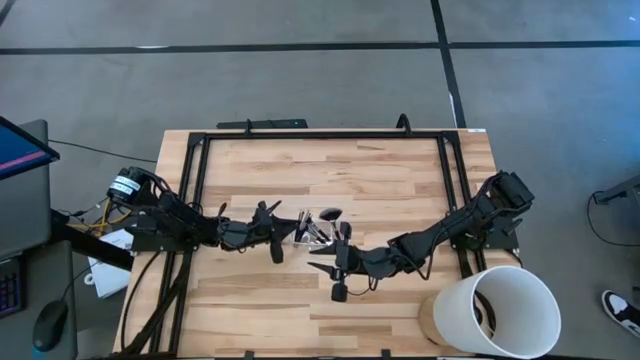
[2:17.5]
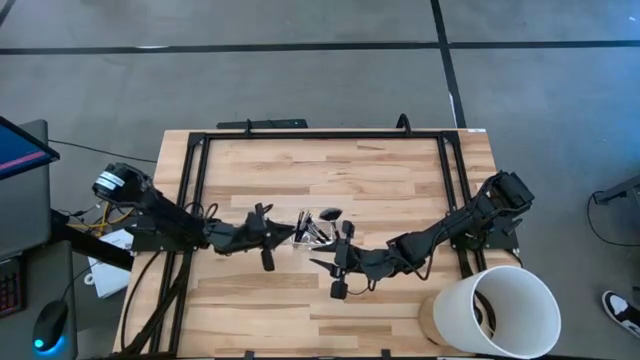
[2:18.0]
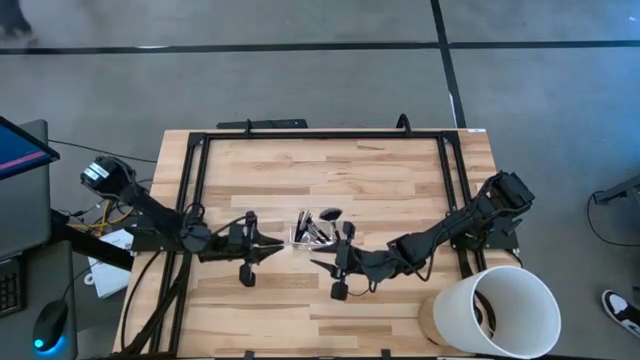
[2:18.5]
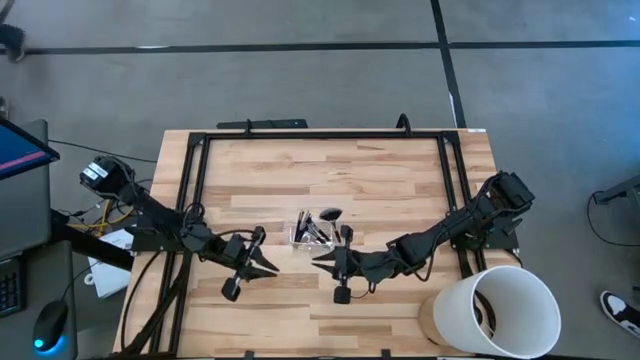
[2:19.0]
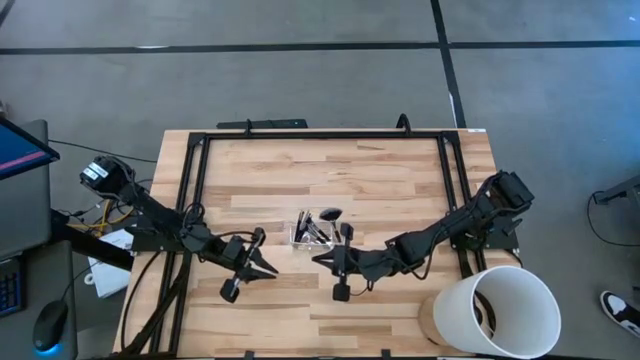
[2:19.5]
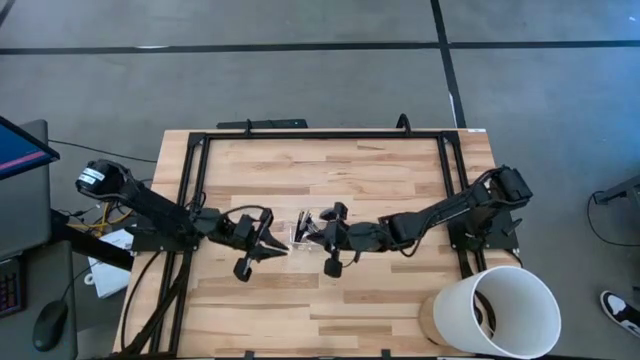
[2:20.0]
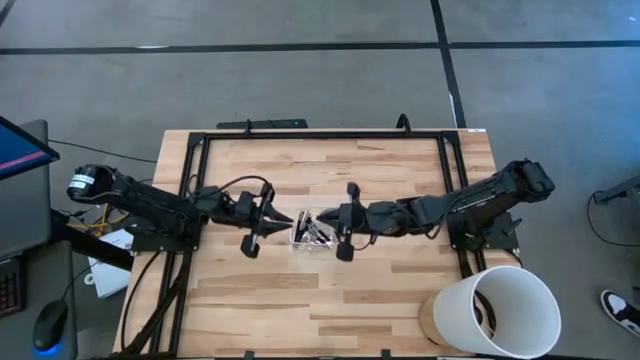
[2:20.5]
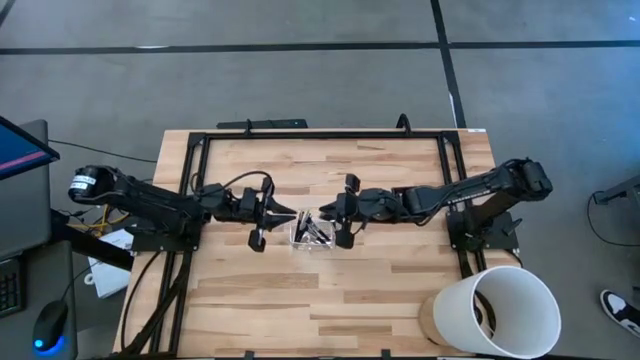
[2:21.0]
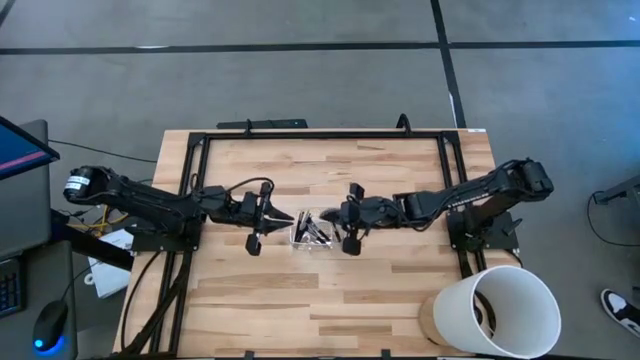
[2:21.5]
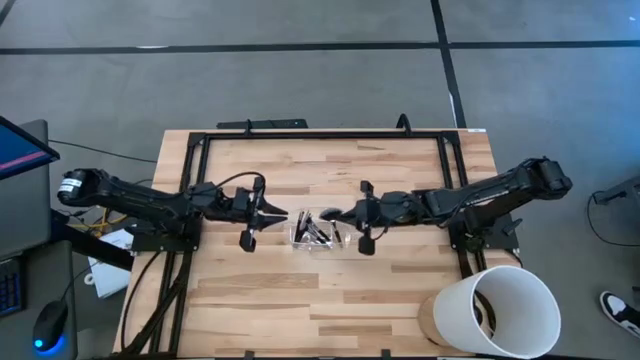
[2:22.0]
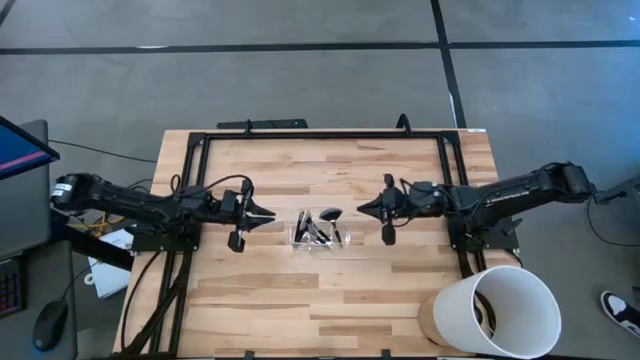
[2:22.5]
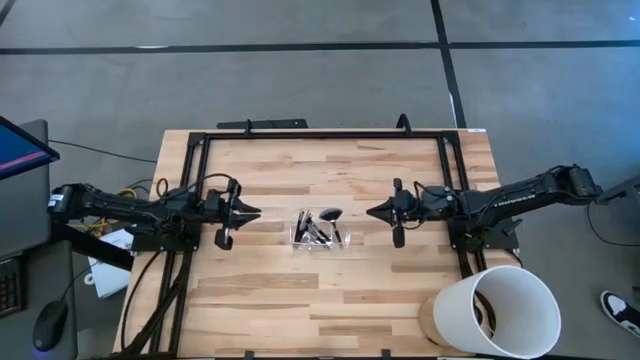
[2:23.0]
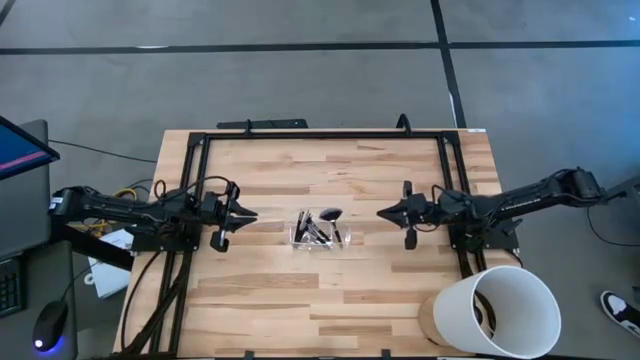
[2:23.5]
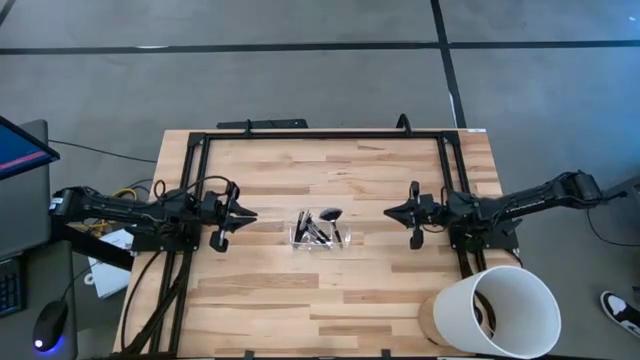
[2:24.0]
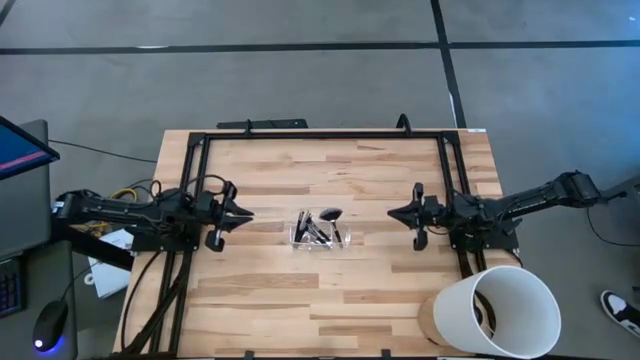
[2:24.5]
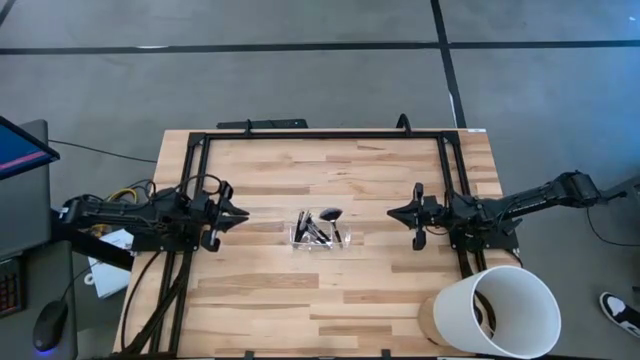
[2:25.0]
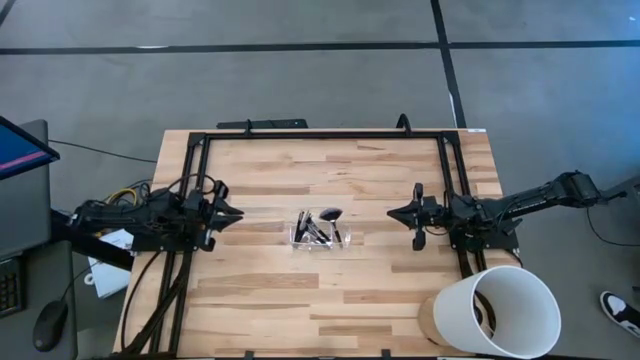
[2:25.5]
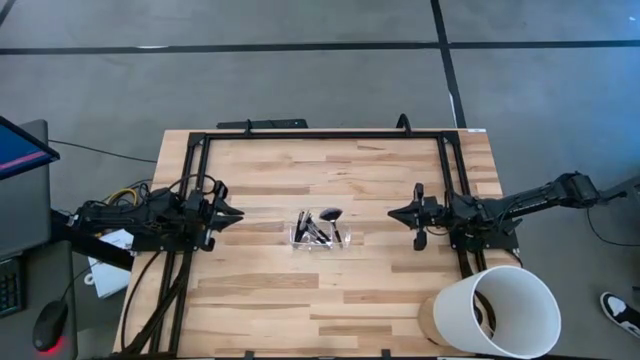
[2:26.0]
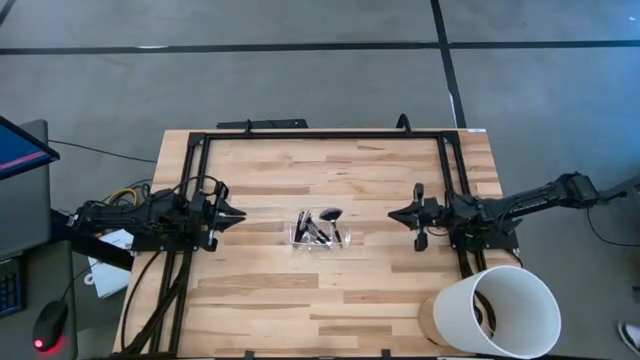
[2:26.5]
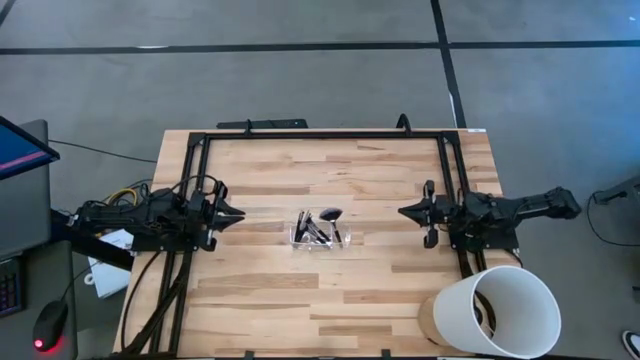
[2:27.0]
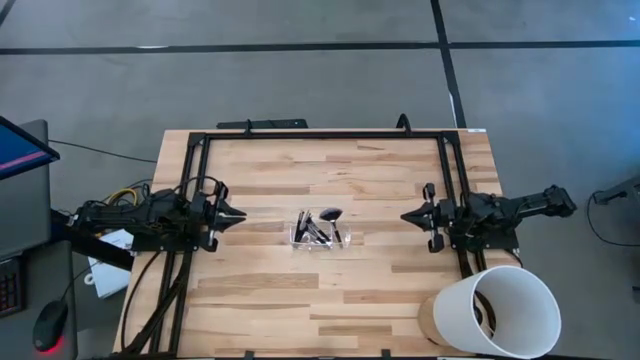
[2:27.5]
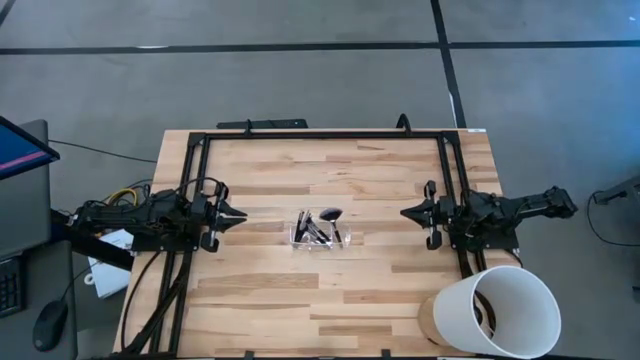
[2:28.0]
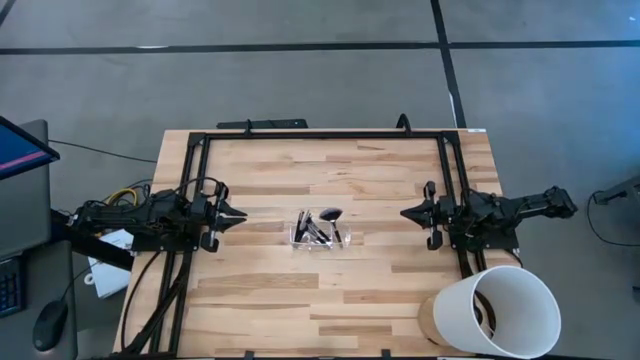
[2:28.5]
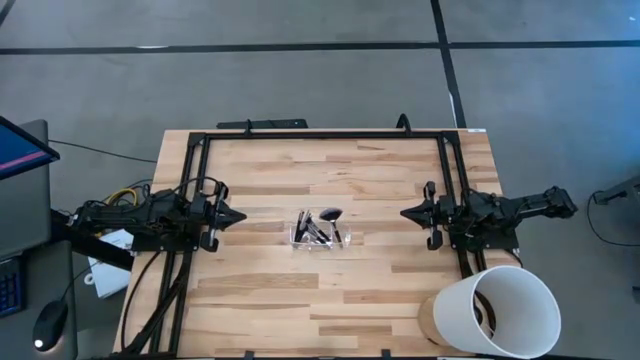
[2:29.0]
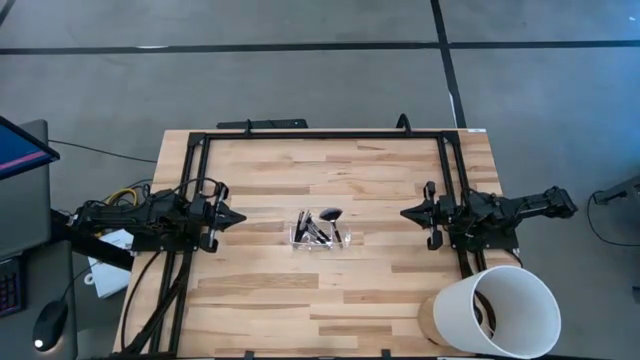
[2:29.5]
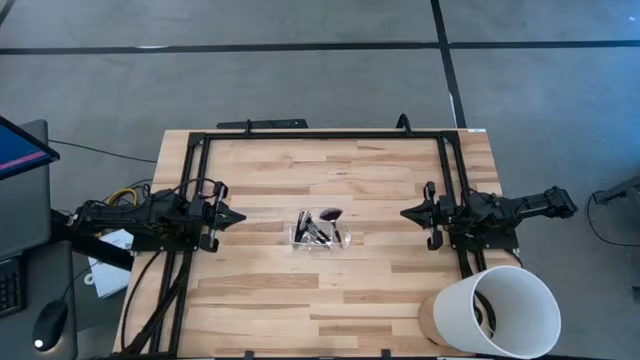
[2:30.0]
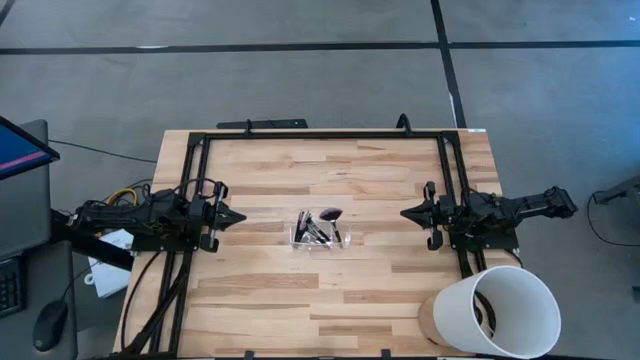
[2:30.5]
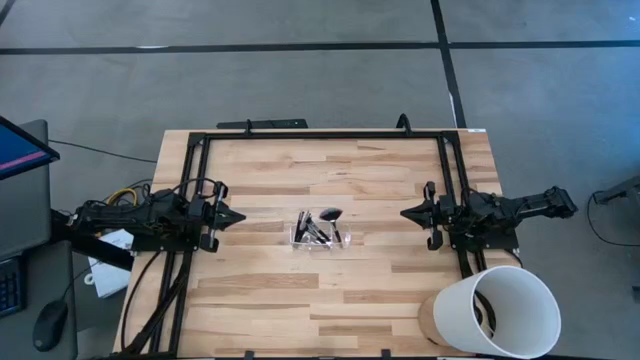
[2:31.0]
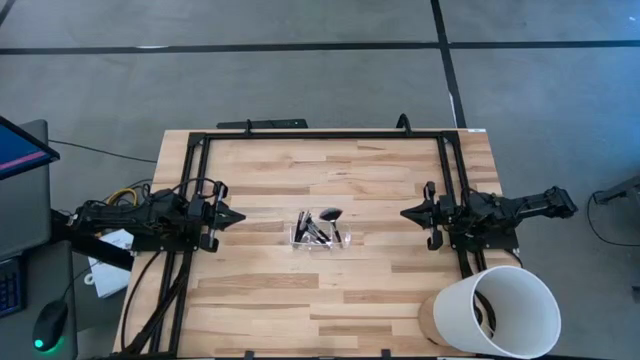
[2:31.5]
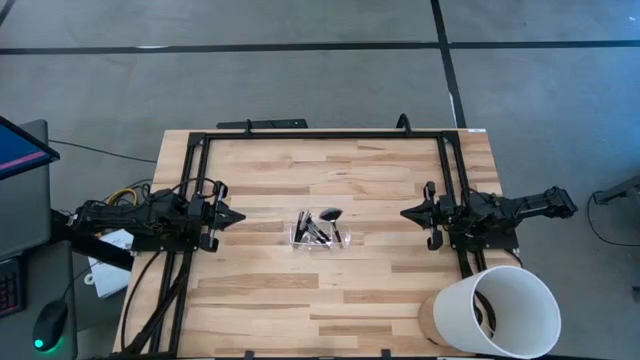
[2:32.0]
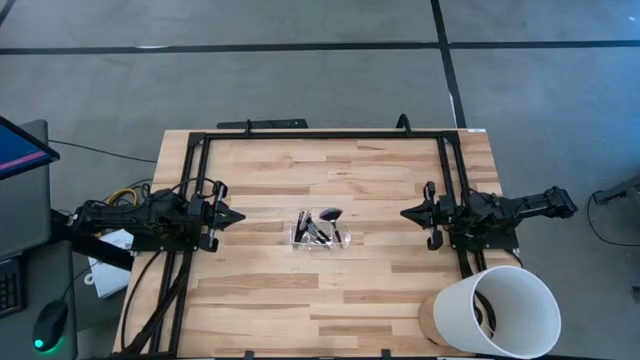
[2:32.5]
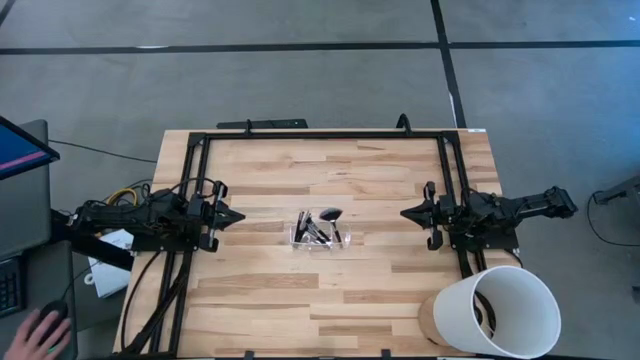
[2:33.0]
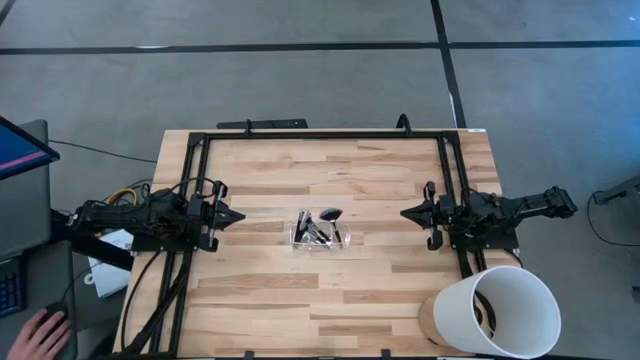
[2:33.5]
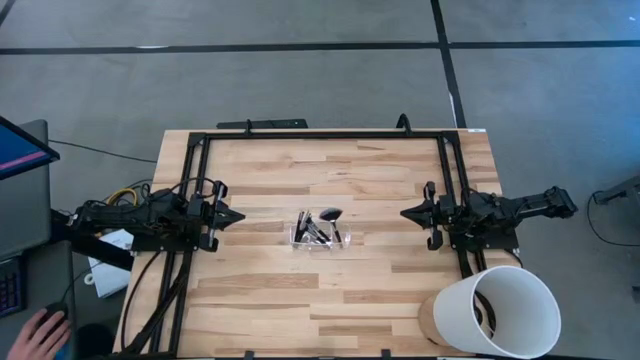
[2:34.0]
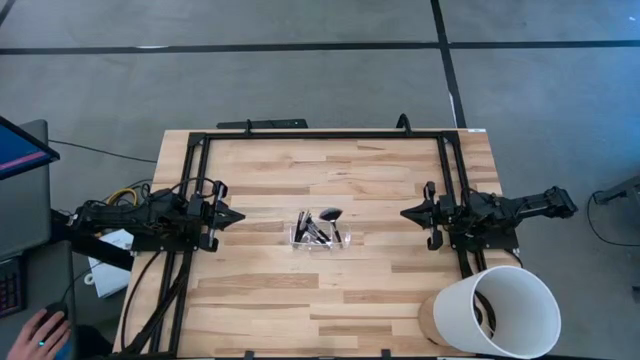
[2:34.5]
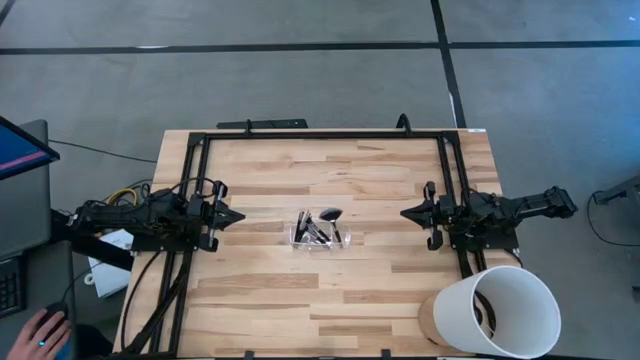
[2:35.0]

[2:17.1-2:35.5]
Task: Put items in baskets/containers
Return to Home Position

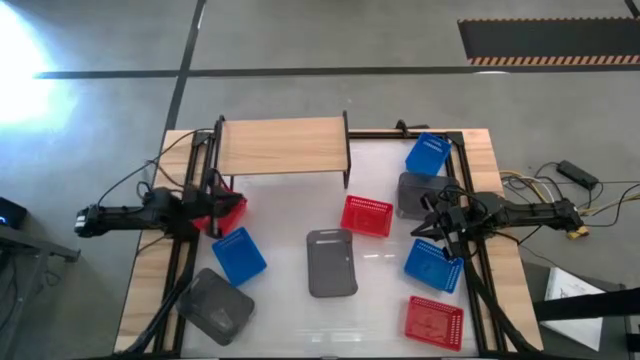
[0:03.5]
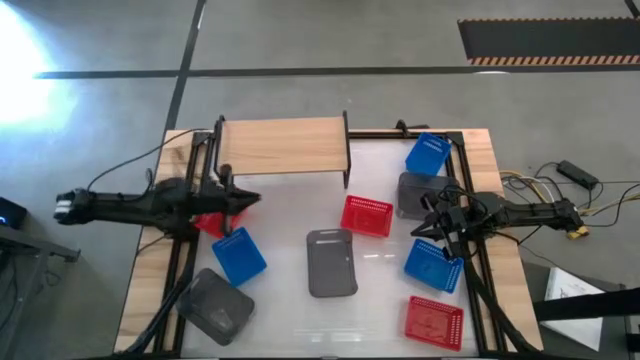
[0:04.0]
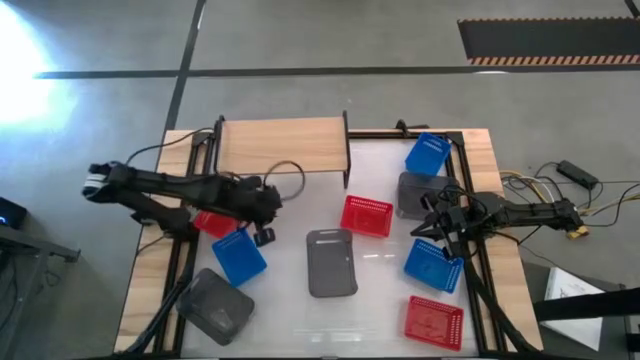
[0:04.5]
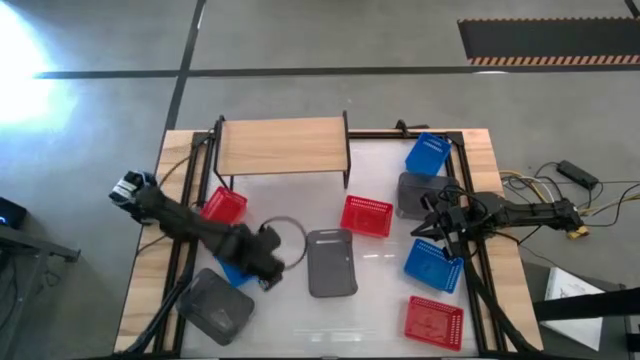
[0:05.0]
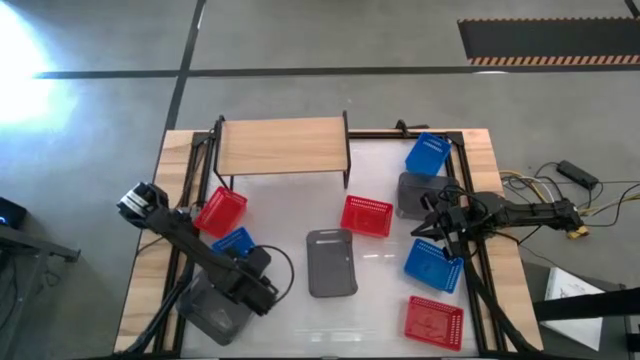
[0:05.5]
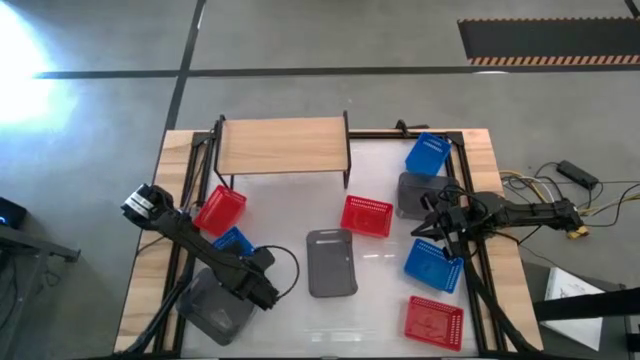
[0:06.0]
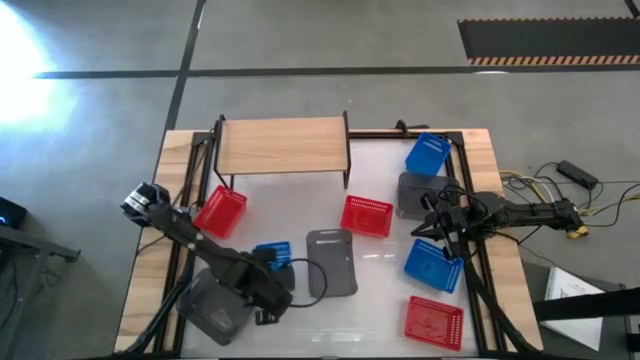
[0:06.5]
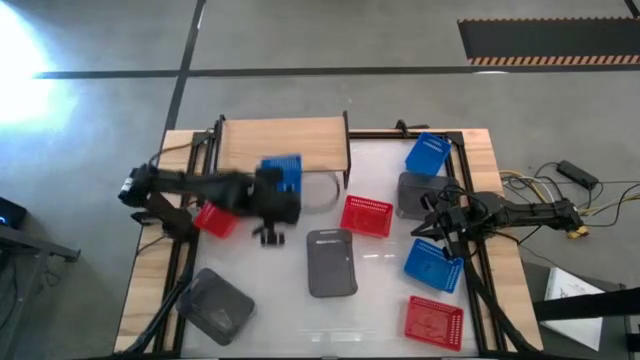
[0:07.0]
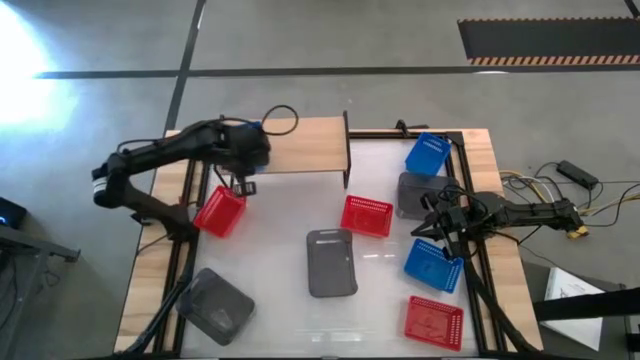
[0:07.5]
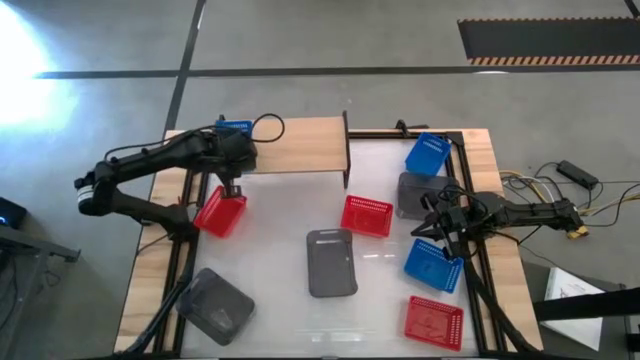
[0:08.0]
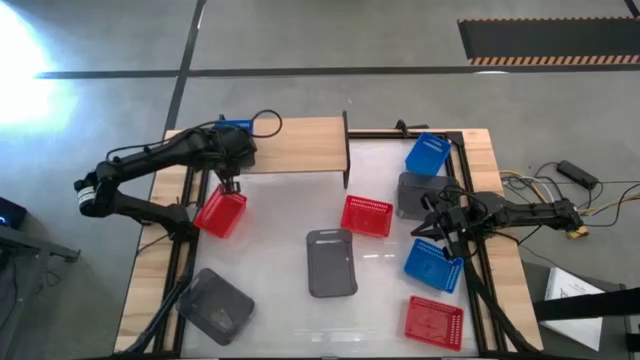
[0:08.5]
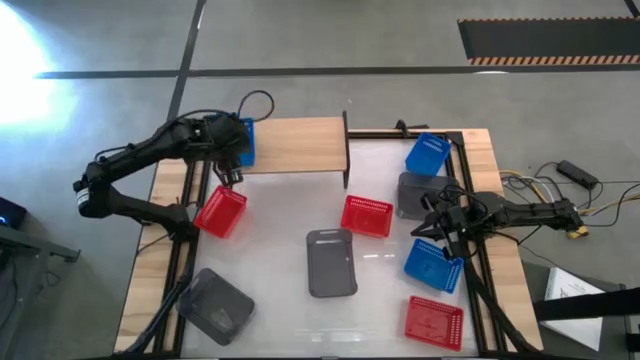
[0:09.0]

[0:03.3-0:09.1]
Task: Stack baskets on shelf by color
Put the bottom left blue bin on the shelf
